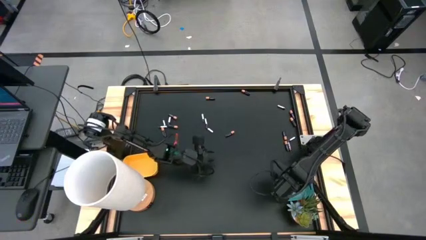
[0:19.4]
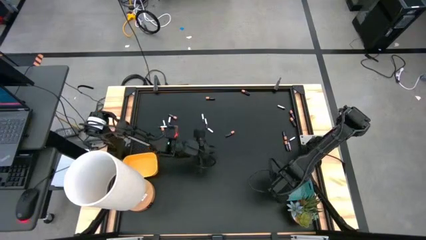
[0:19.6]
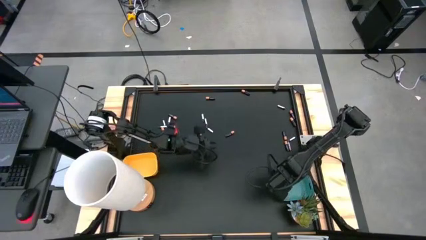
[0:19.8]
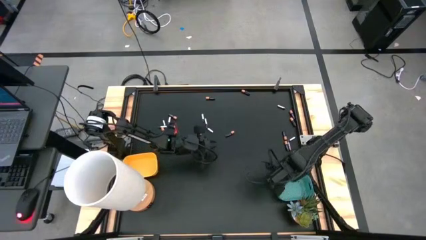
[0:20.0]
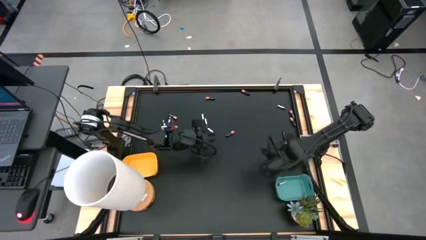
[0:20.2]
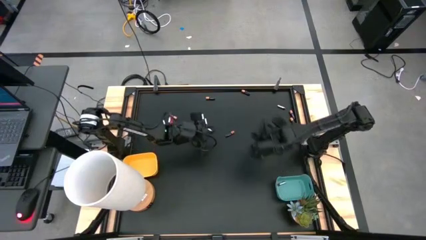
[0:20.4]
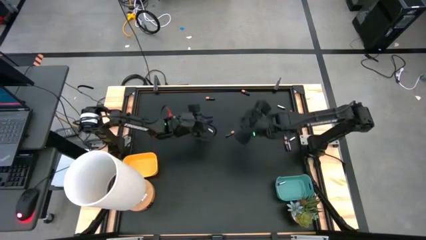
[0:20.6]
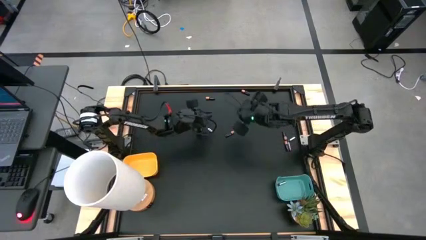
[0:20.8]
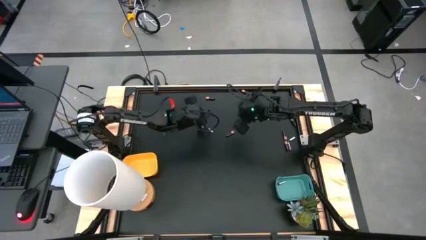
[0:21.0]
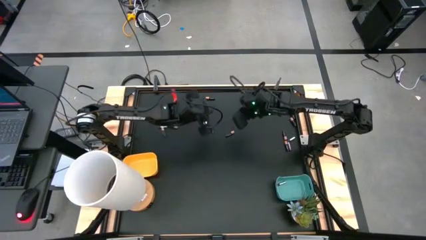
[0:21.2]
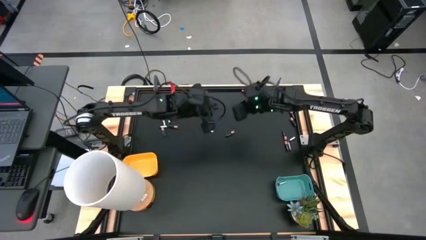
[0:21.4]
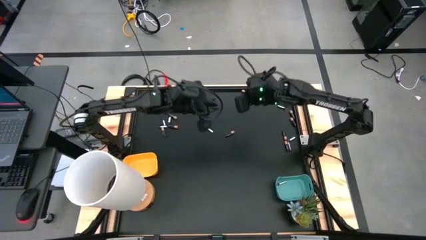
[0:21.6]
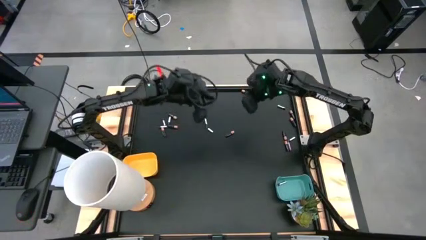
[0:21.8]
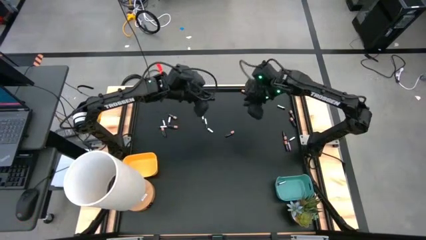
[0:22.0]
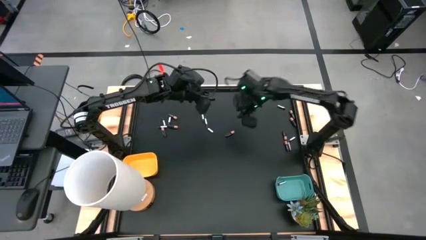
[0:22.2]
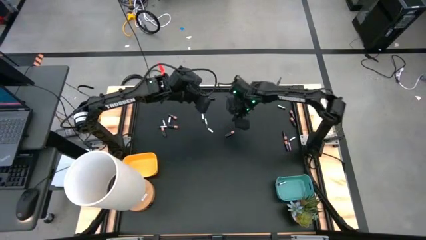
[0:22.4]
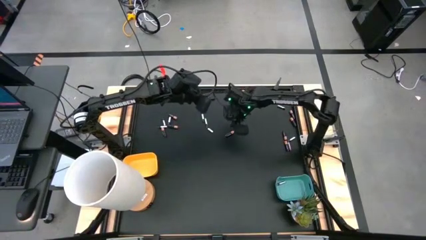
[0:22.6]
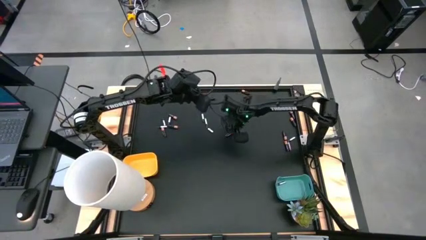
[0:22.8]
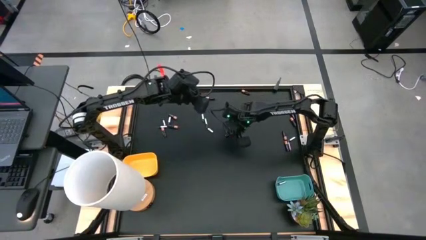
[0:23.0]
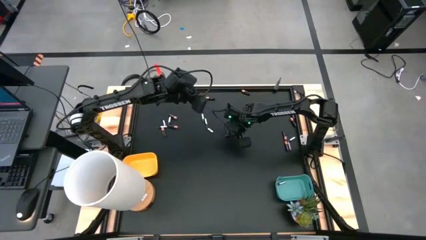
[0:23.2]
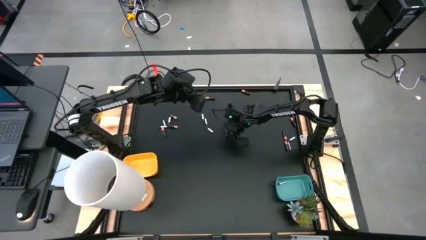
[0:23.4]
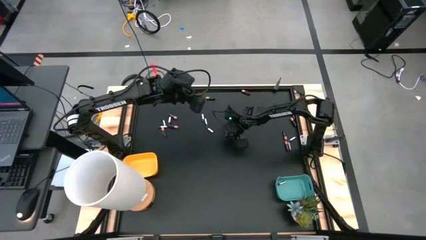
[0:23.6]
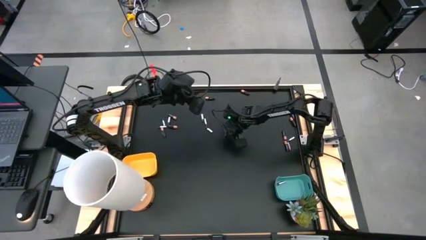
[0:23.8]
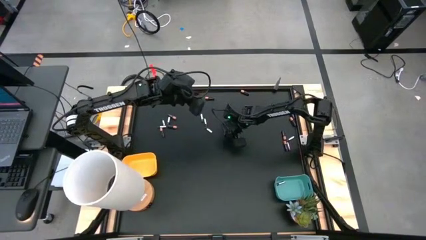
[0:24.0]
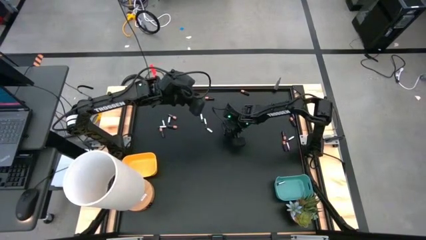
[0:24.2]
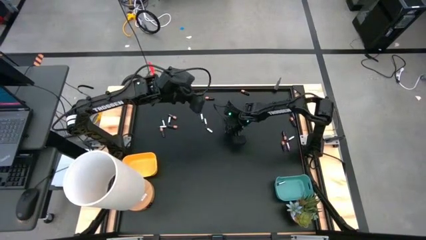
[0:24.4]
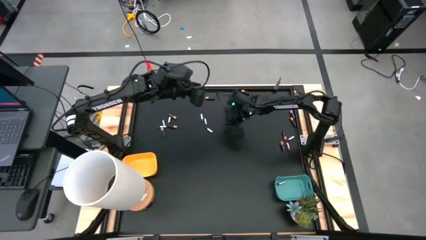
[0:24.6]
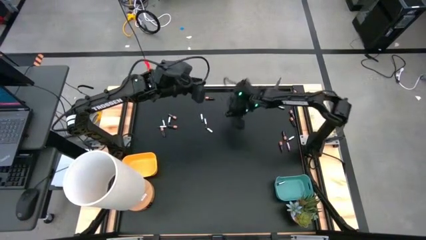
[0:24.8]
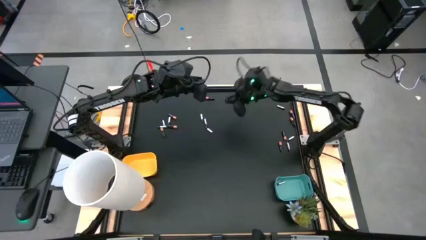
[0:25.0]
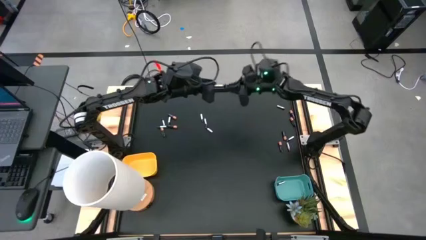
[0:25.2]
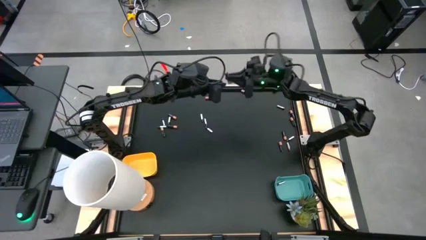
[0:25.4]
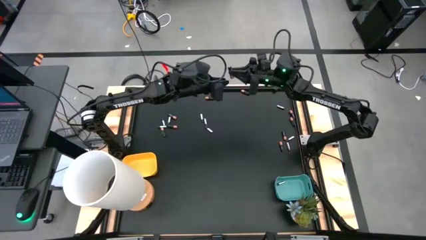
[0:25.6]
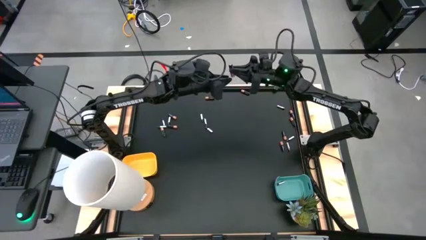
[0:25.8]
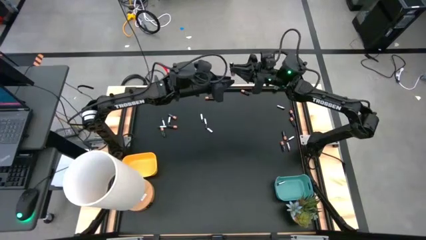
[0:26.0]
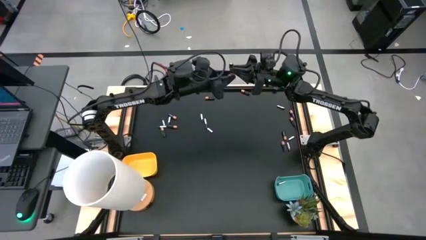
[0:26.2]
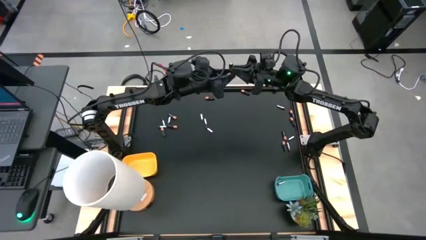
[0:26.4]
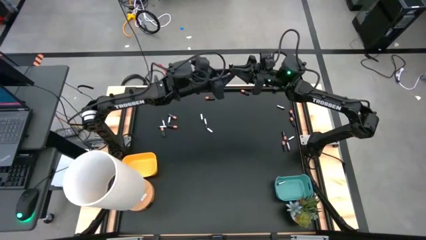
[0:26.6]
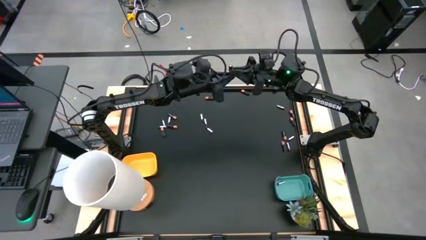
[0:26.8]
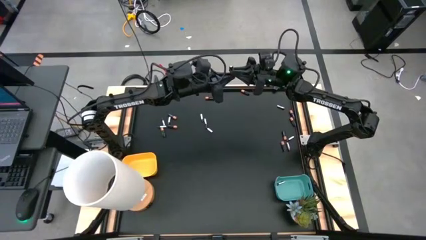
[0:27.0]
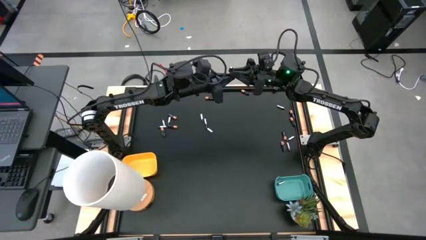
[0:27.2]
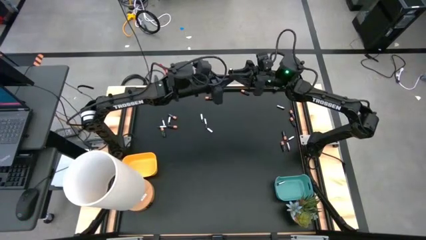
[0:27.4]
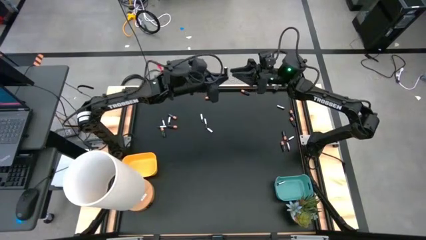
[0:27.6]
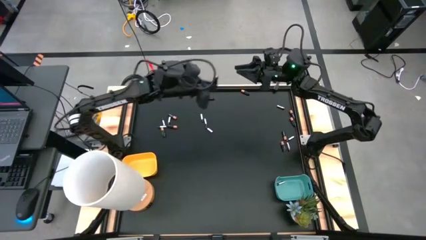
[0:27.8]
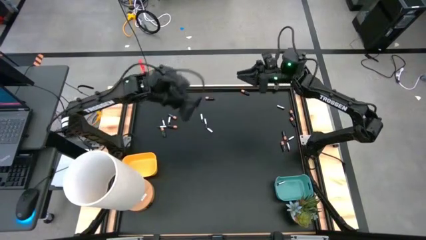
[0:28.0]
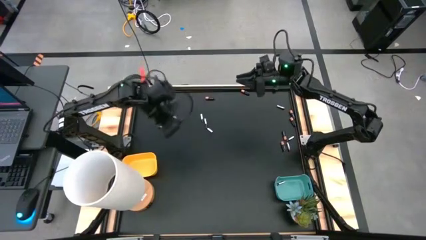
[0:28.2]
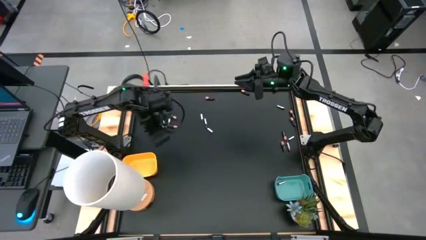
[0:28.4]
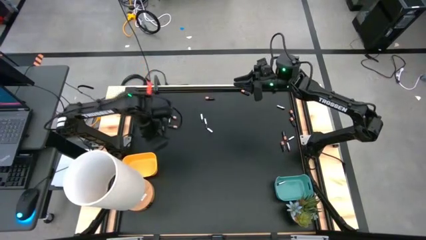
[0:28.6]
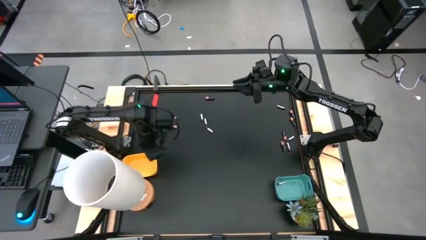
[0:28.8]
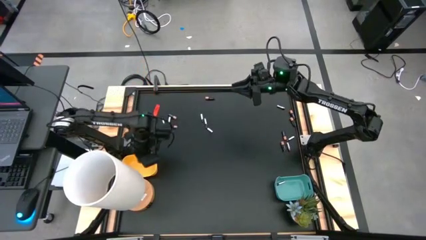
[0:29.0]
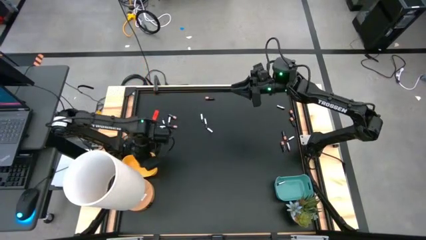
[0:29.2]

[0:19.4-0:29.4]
Task: Sort batteries
Put the black battery into the yellow bin

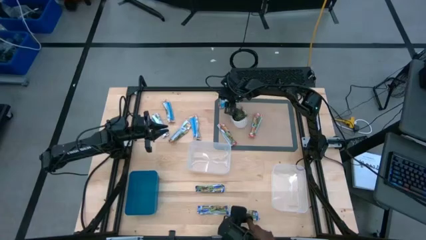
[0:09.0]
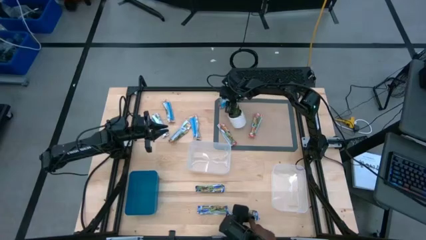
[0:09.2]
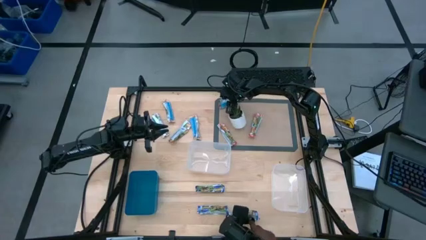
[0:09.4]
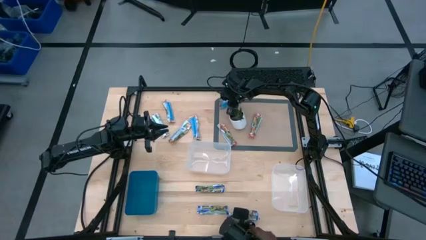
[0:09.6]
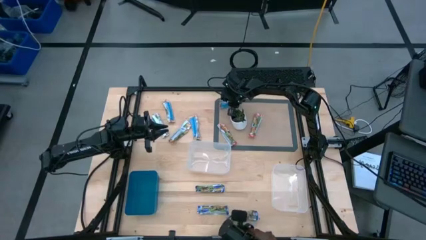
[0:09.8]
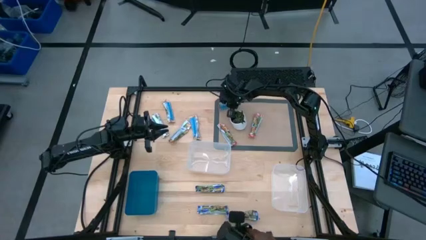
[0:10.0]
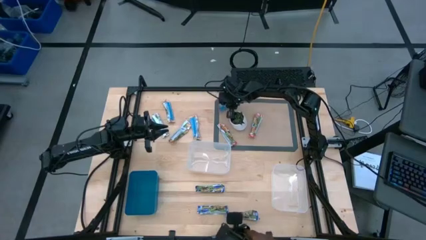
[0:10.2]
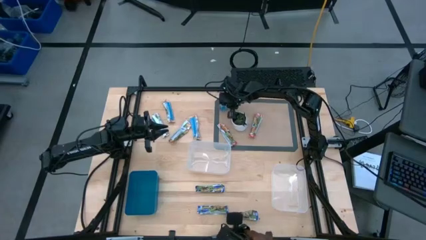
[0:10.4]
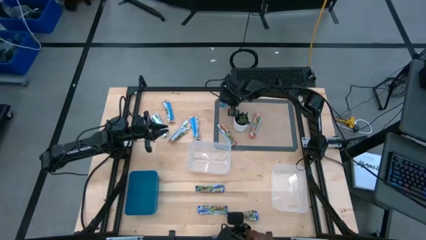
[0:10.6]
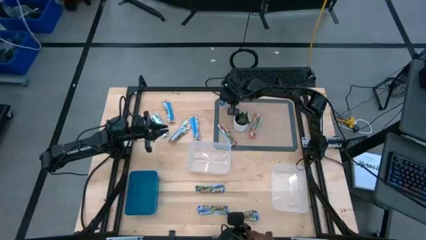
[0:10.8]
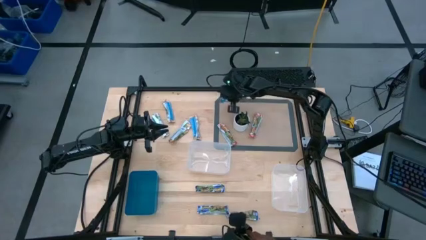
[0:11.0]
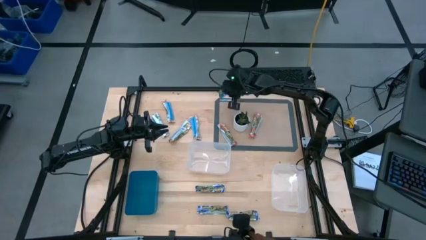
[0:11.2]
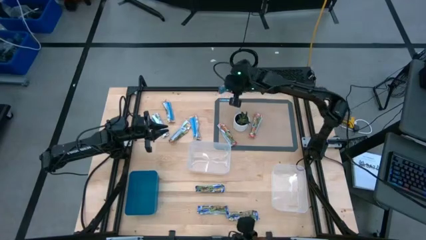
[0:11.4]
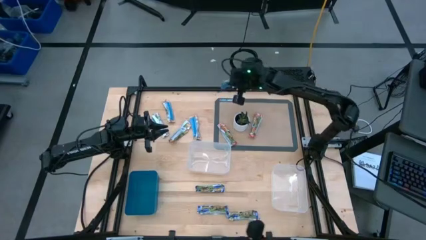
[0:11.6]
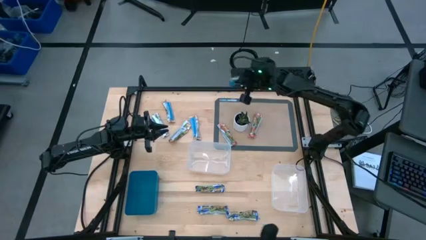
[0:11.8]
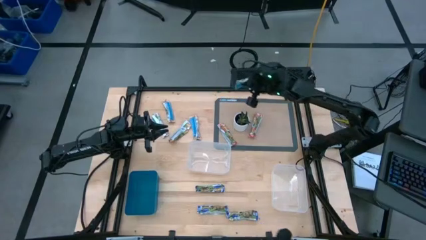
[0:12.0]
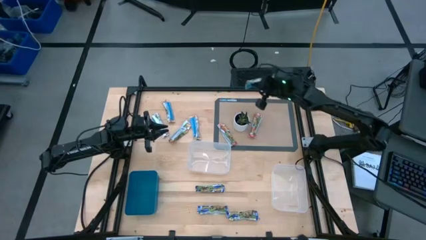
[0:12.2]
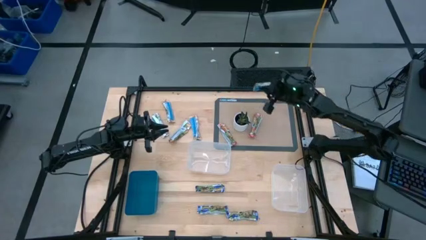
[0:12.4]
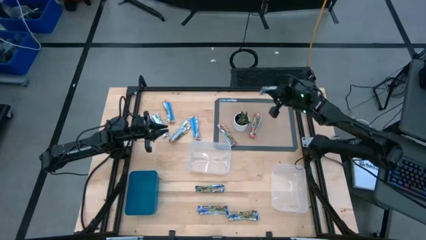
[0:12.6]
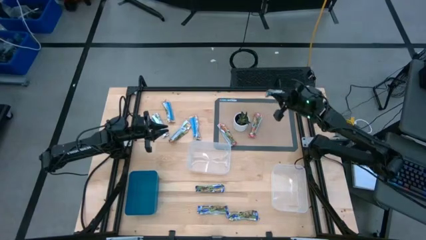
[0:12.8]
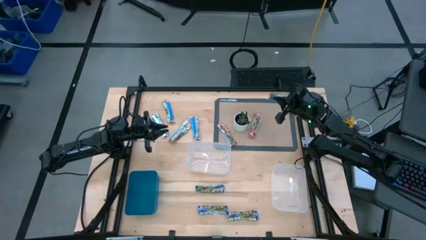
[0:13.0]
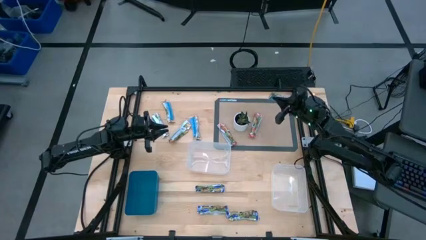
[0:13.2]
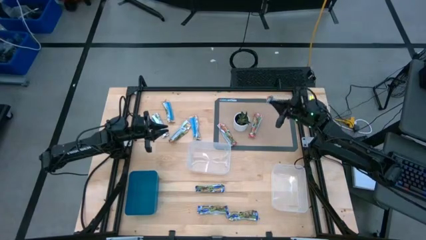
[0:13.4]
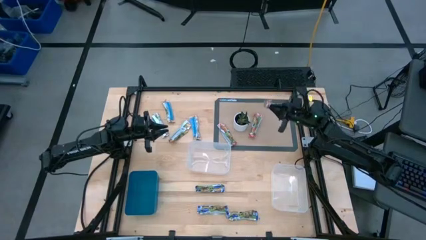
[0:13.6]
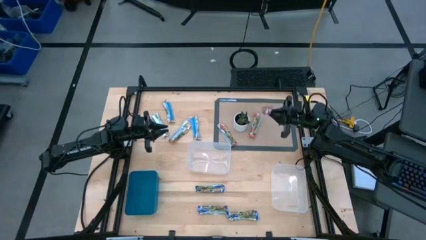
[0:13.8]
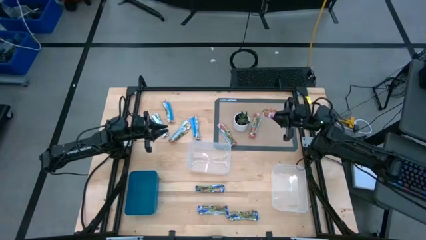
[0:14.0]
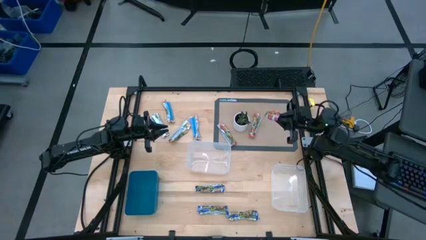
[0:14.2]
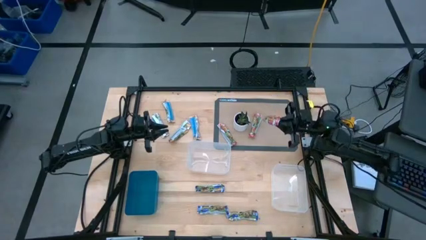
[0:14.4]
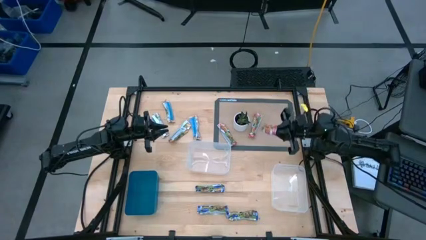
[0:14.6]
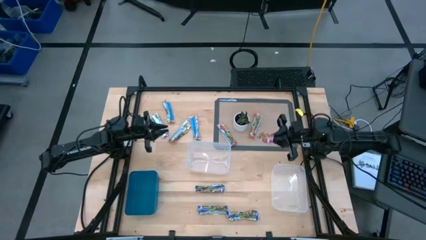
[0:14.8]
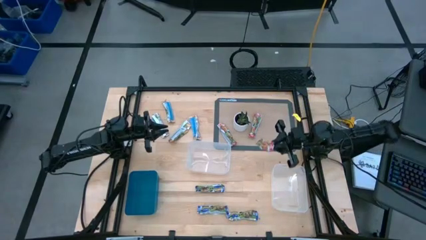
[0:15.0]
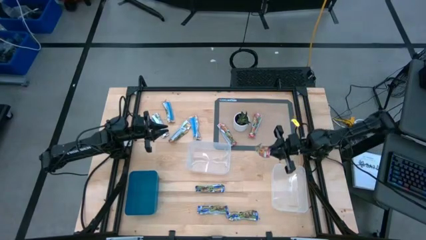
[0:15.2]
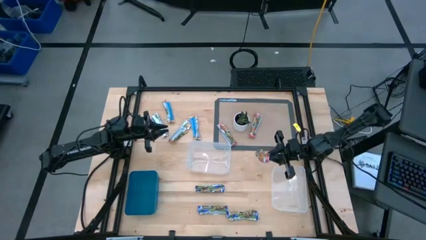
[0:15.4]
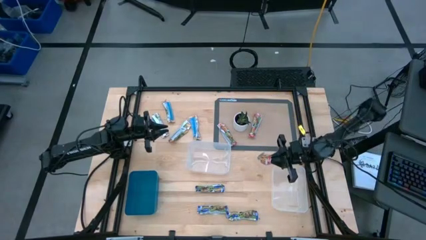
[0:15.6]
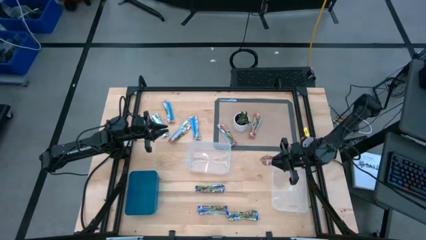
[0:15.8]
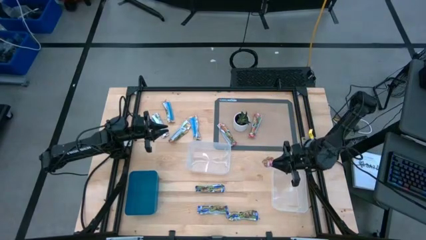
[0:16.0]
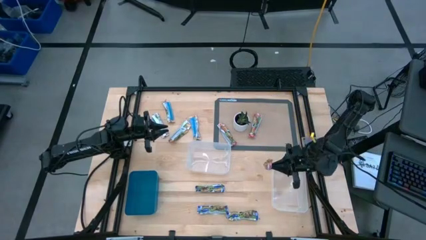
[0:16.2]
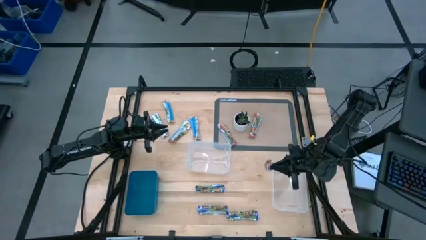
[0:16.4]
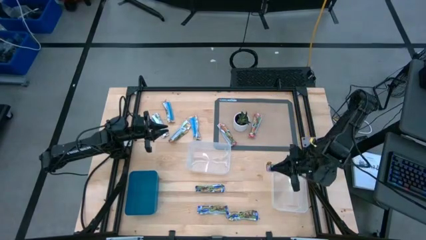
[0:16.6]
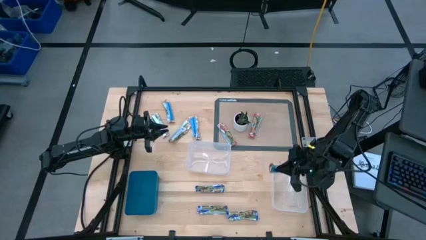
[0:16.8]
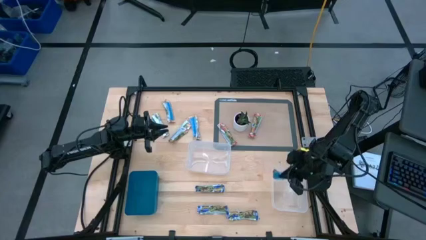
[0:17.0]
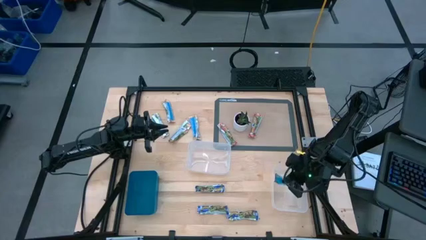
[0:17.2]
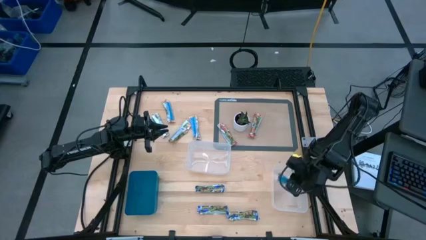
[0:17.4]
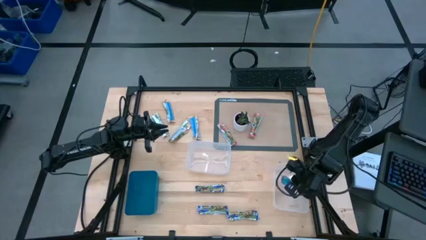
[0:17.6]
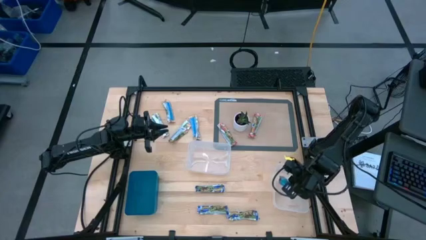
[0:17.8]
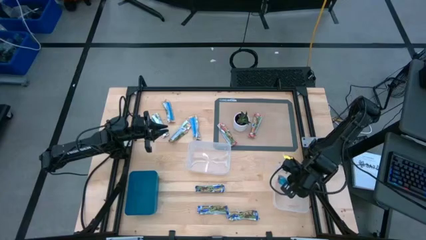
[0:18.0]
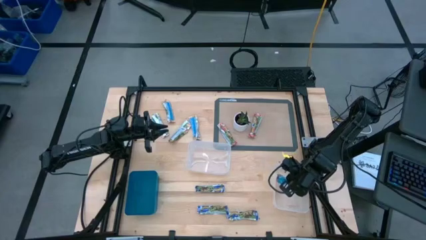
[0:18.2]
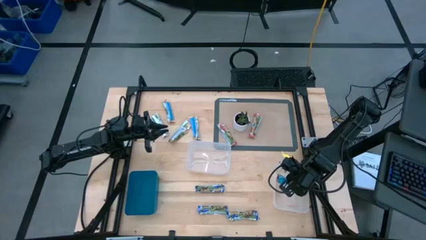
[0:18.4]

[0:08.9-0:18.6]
Task: Pick and place Granola Bars by type
Put the red granola bar into the right transparent bin
